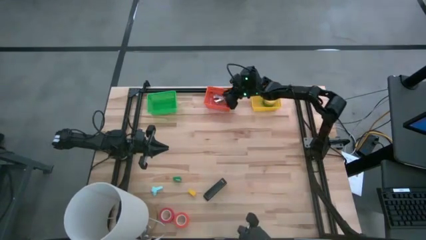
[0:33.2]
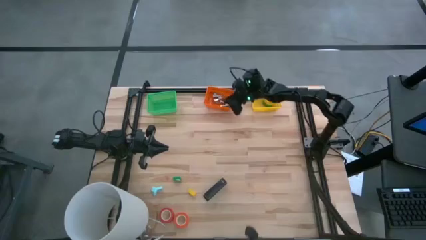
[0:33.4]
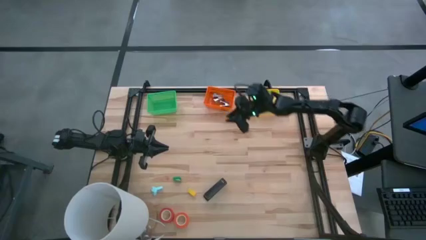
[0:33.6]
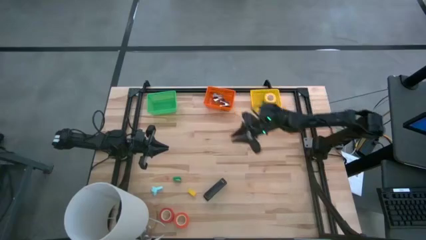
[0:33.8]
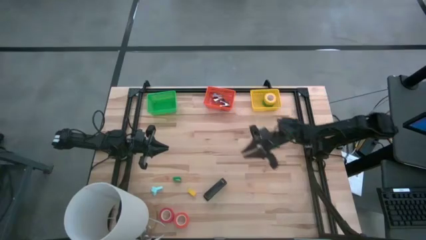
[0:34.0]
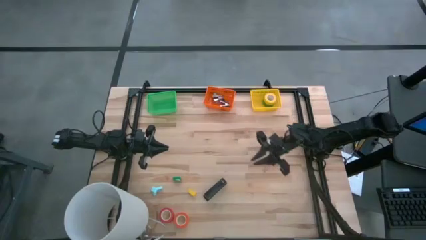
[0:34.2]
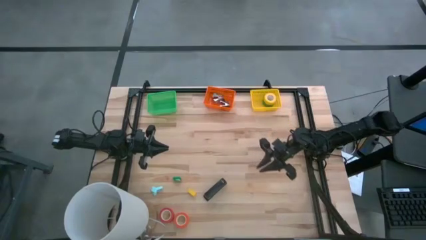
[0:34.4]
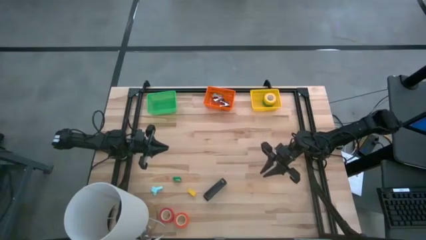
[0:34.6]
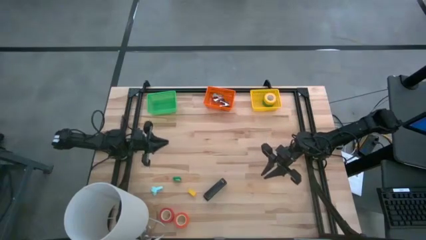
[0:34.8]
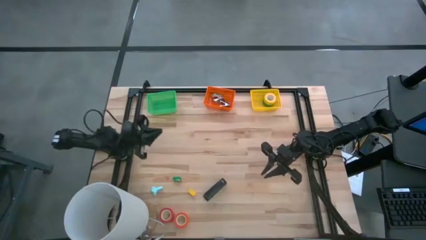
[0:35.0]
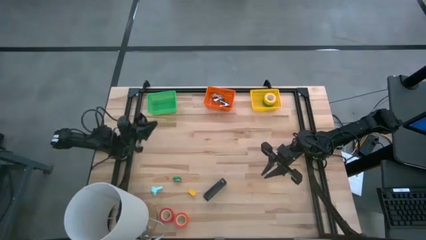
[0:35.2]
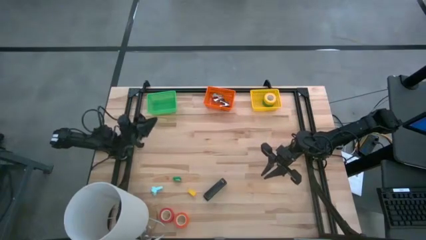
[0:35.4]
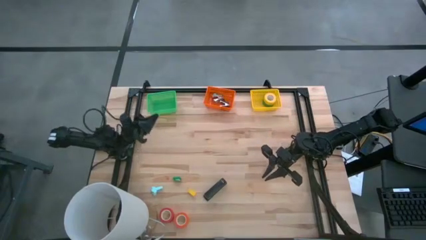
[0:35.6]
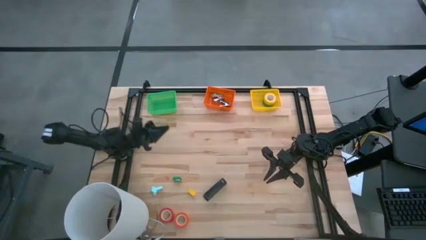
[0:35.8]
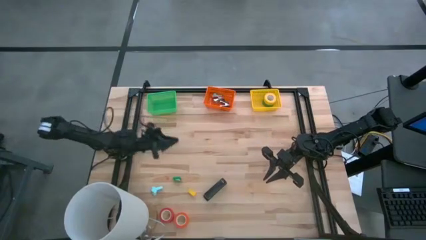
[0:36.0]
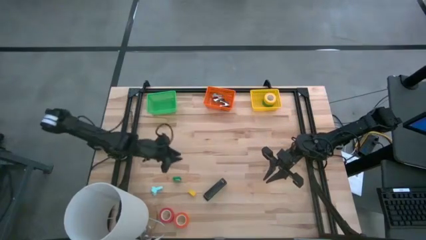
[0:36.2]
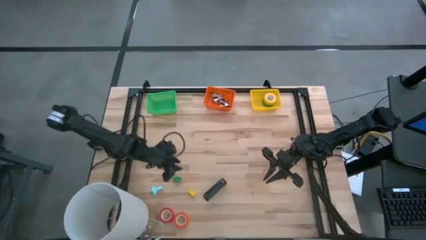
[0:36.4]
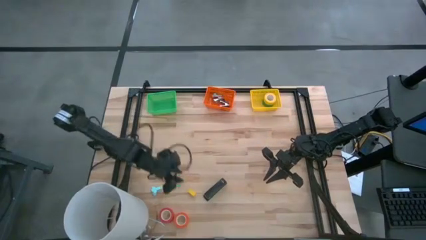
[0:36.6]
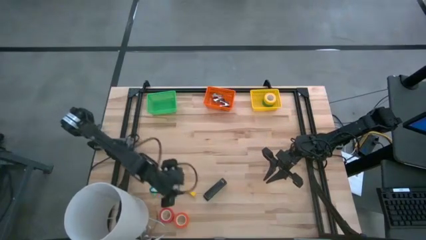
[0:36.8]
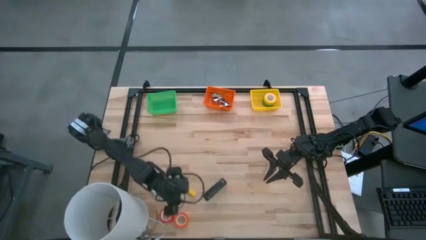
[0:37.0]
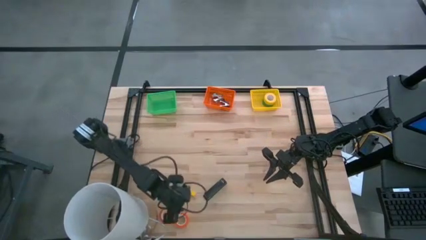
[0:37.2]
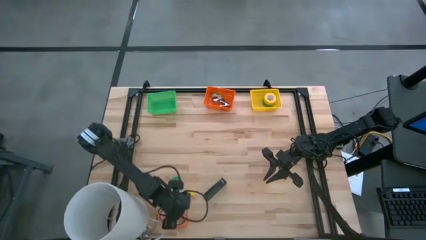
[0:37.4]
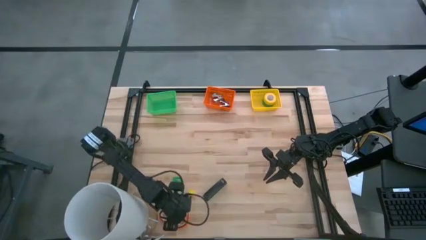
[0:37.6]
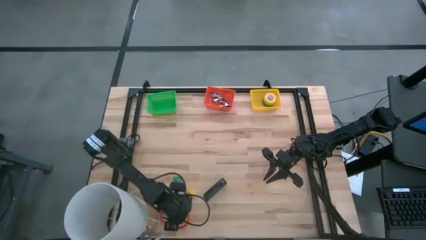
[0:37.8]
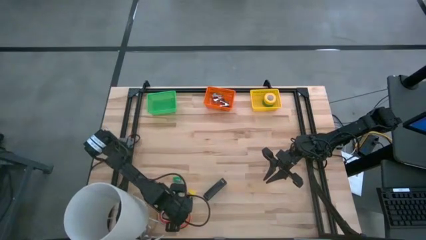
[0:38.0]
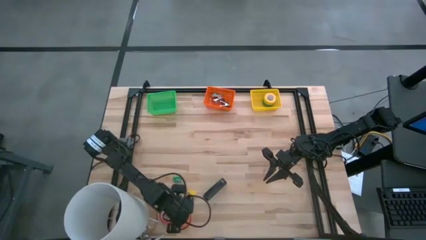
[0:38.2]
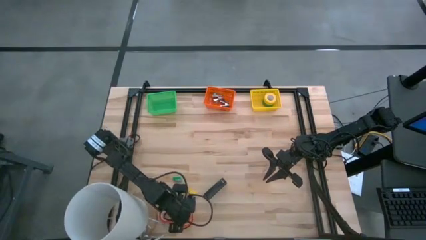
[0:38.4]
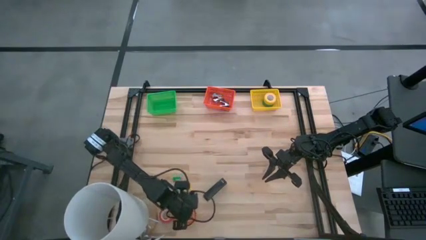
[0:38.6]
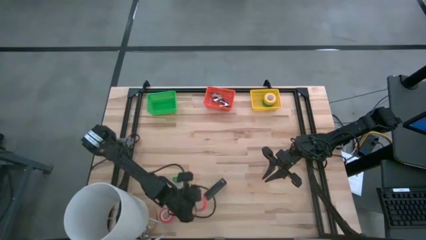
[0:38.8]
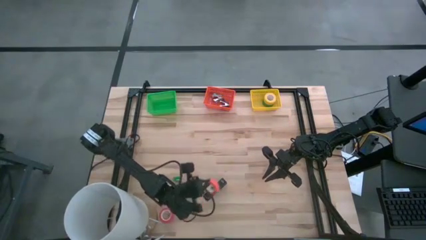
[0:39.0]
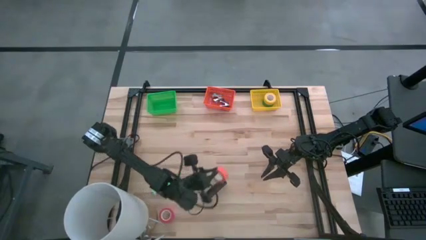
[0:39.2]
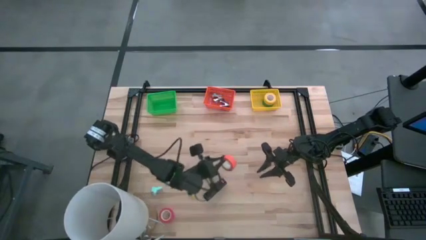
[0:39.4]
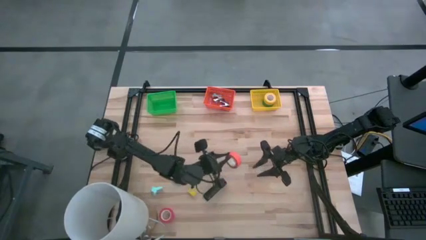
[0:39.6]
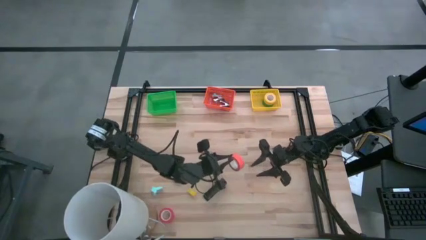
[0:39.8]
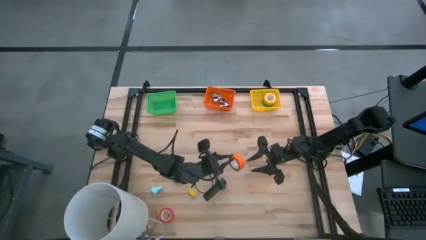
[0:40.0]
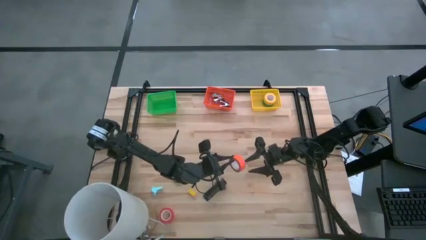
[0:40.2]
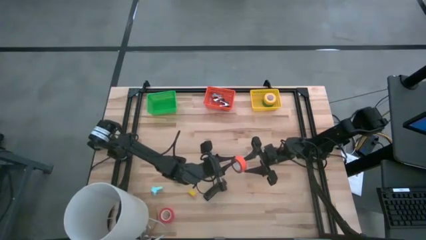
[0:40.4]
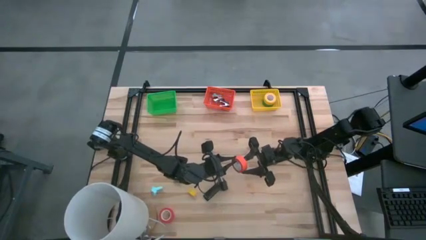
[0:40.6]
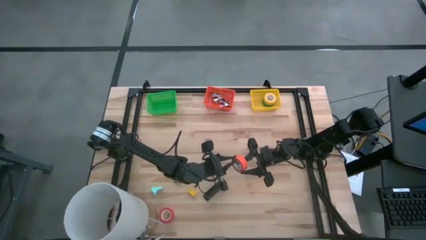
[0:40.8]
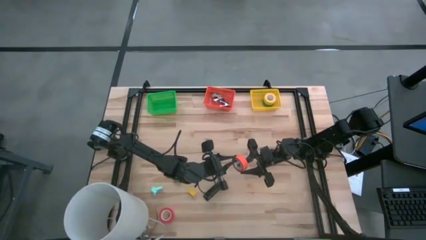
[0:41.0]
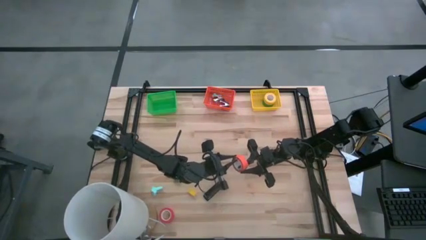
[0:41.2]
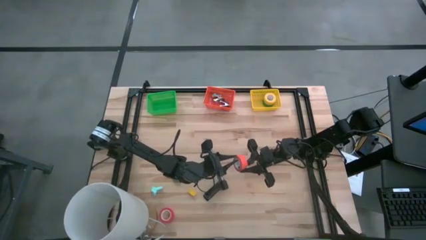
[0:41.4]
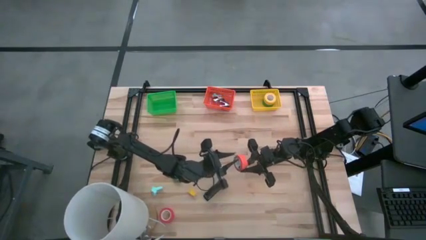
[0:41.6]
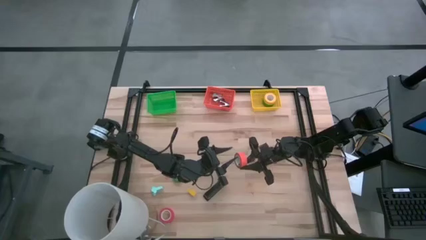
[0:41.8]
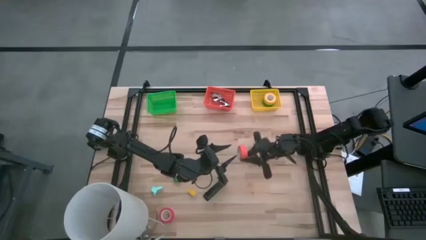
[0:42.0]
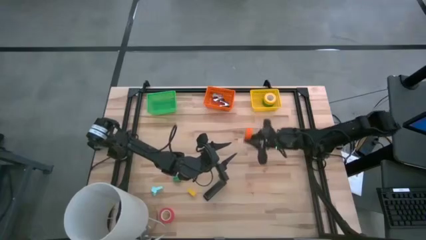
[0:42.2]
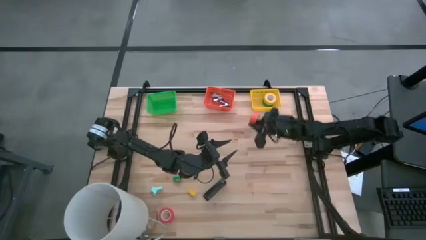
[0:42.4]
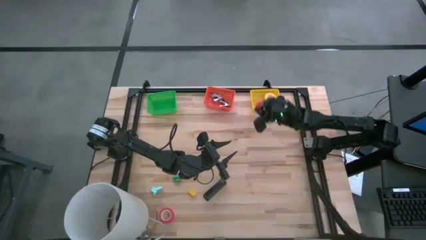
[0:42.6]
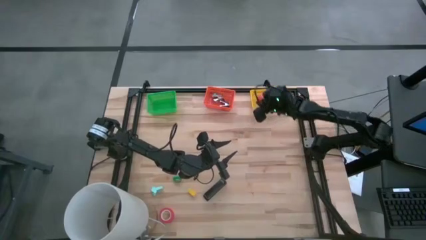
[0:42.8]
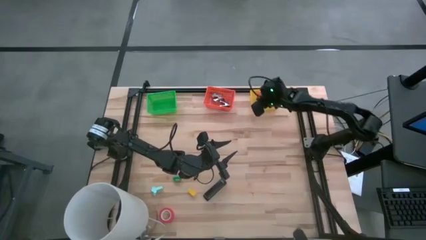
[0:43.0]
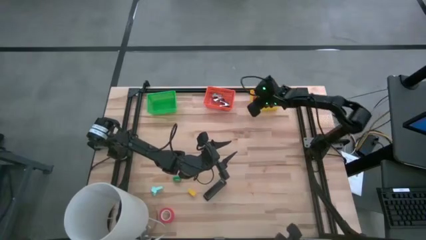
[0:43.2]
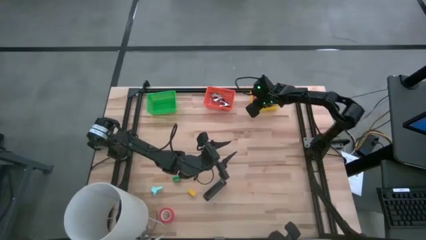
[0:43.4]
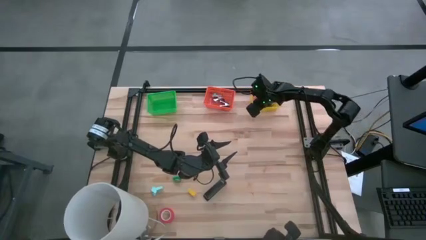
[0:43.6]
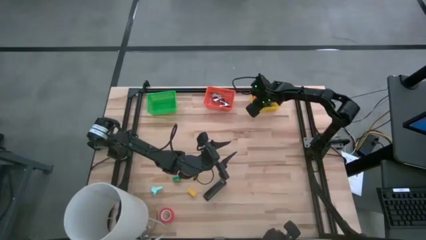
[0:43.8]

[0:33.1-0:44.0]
Task: Pick and place Stapler, Stapler remover, tape
Put the orange tape into the yellow bin

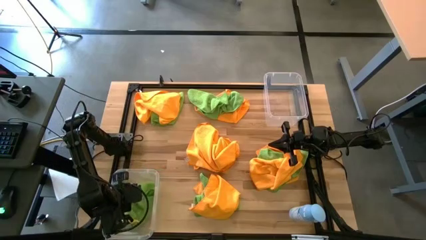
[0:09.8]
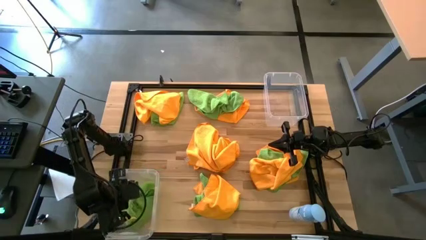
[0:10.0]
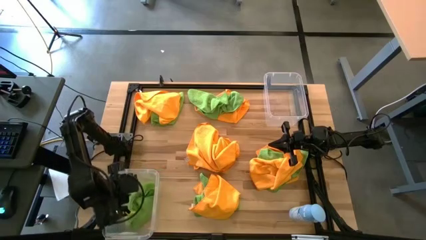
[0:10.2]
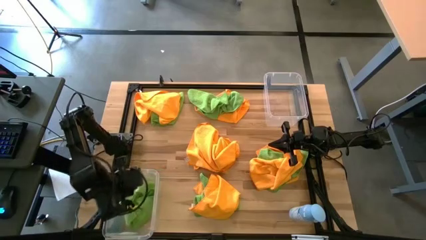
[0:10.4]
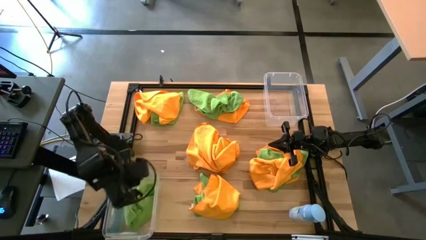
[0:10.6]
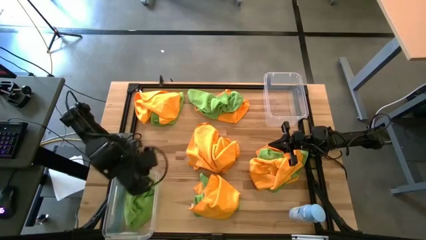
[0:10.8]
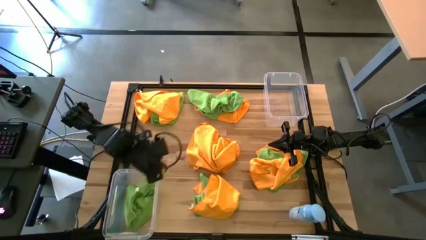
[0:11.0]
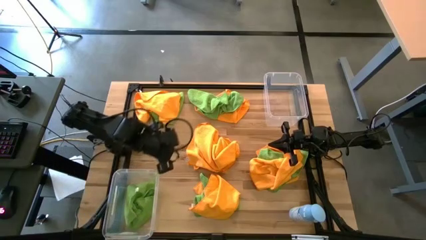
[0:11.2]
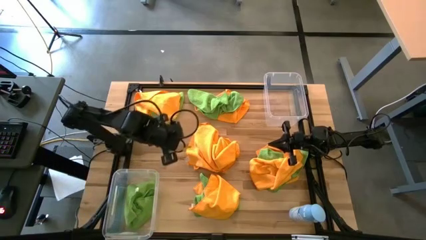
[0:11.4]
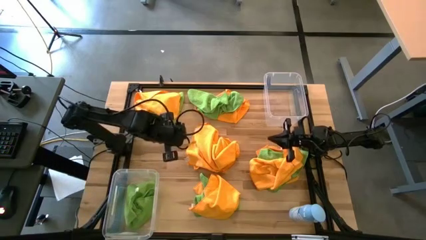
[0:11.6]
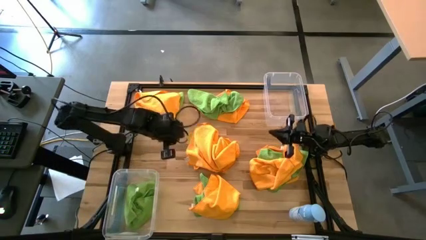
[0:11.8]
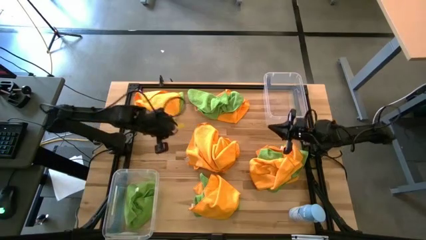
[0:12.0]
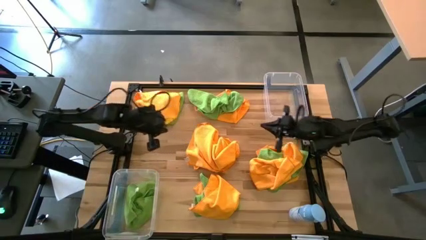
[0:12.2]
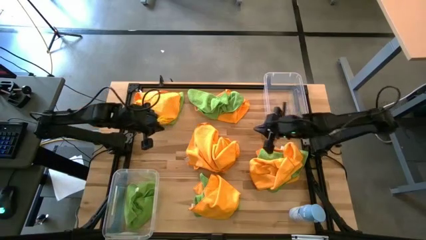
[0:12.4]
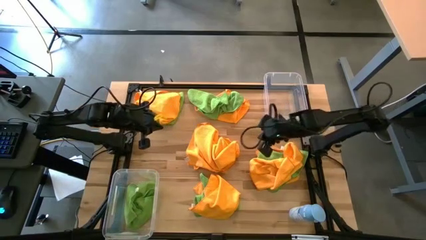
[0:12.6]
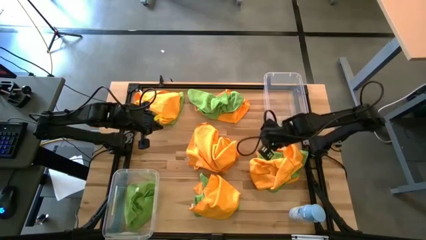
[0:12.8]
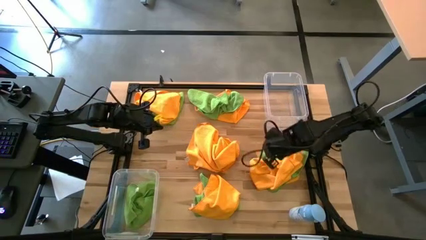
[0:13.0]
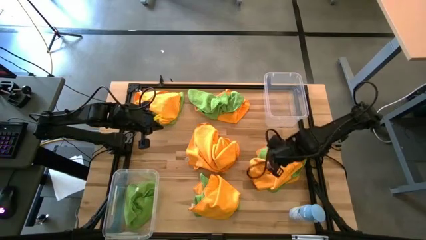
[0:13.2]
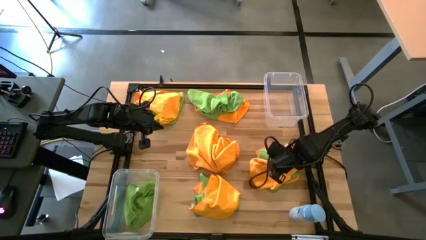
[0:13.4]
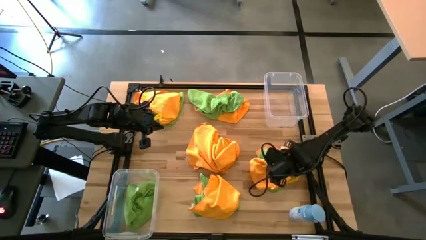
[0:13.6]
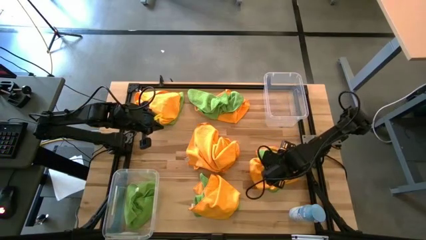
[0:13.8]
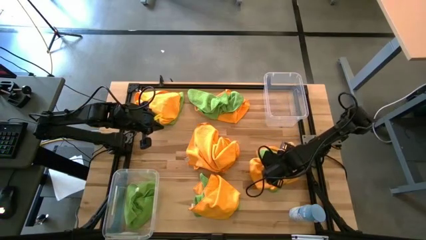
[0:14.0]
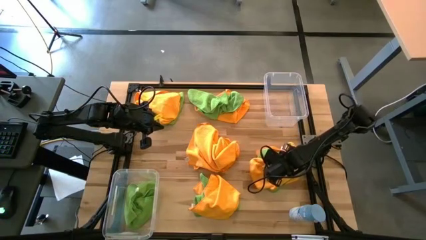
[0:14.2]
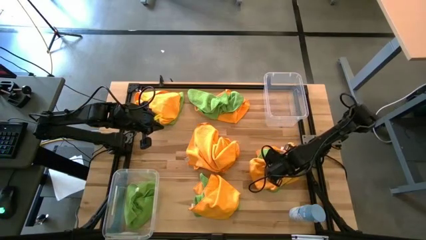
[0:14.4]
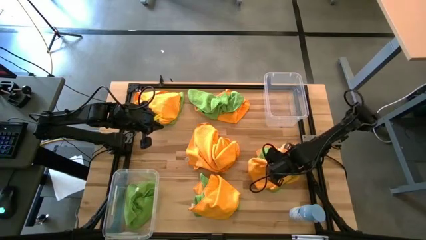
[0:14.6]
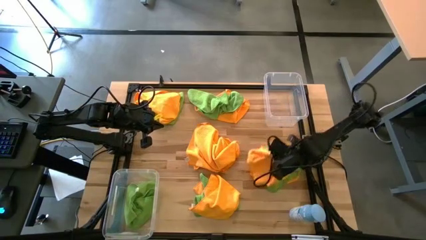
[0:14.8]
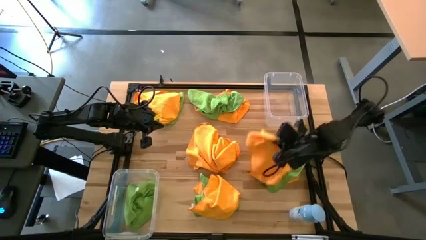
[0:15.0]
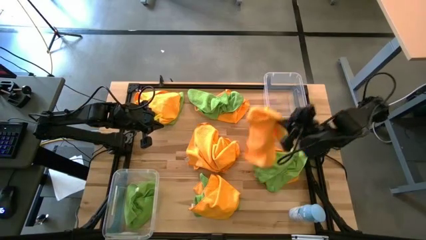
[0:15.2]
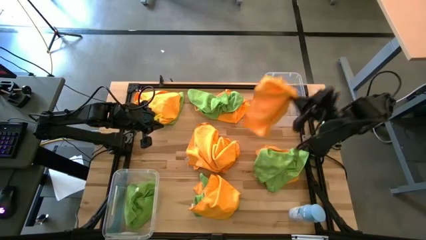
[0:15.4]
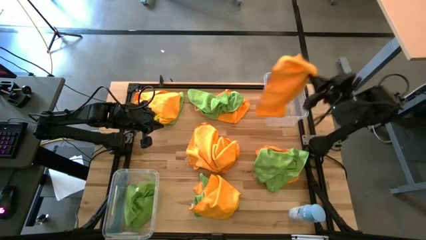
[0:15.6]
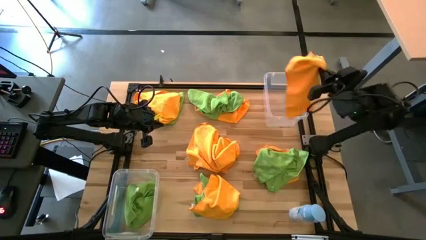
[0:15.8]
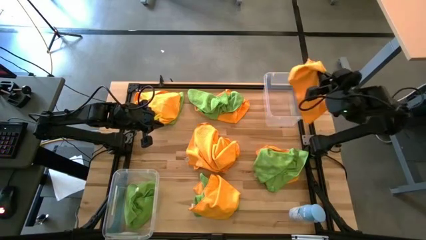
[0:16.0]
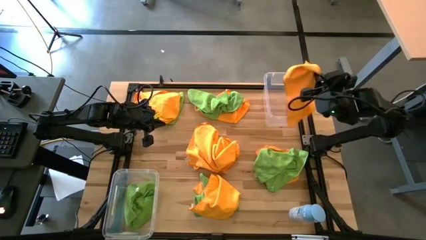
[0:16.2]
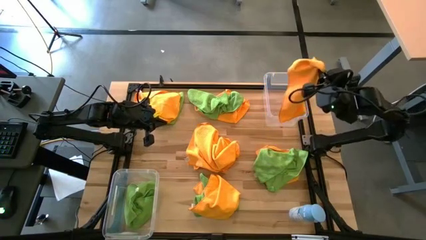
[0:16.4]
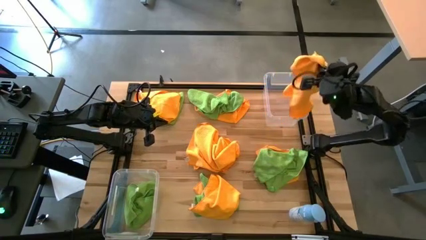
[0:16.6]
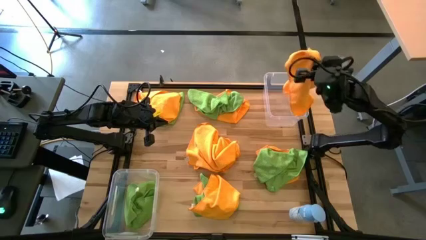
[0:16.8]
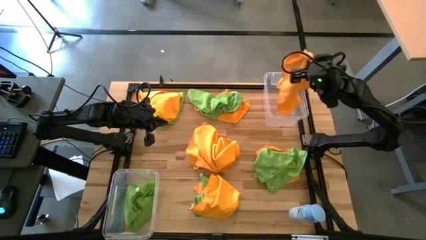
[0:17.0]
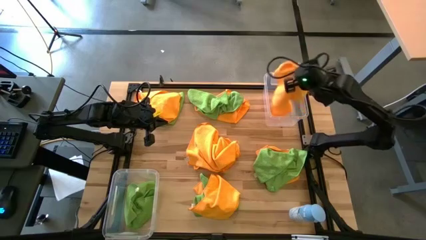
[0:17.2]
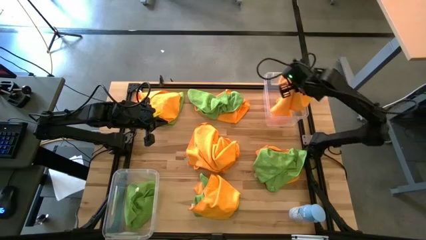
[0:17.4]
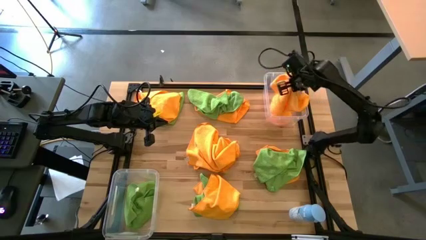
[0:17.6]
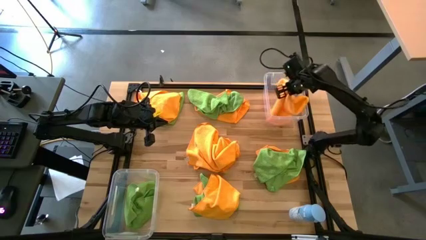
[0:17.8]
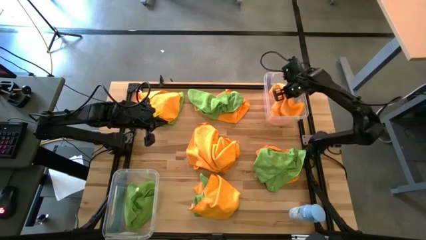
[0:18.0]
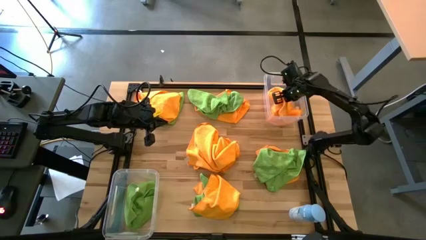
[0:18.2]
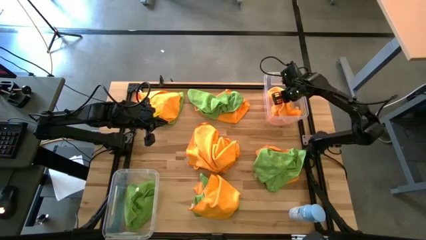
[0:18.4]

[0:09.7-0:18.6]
Task: Sort microfiber towel by color & place in baskets
Put the orange microfiber towel into the top transparent bin
